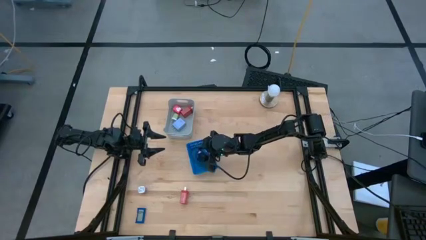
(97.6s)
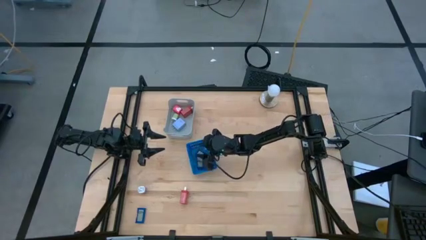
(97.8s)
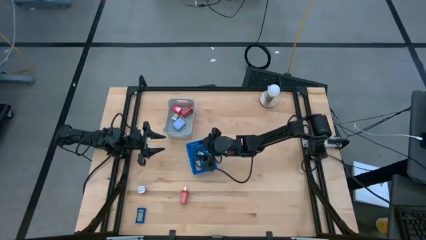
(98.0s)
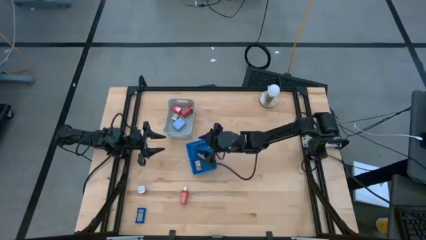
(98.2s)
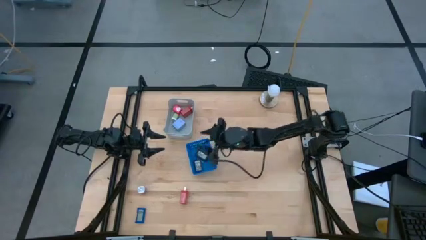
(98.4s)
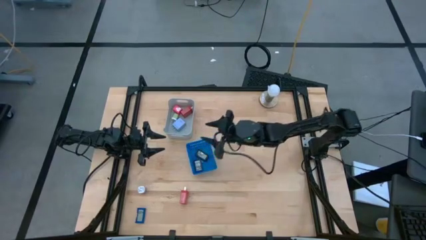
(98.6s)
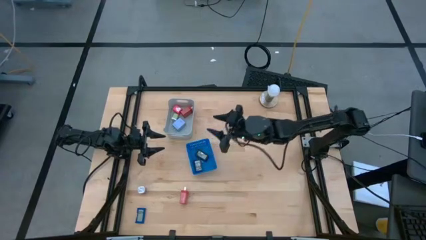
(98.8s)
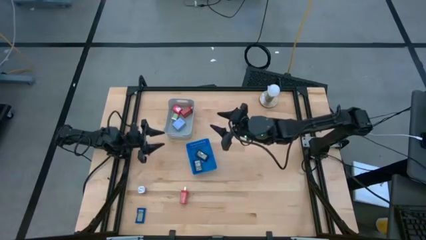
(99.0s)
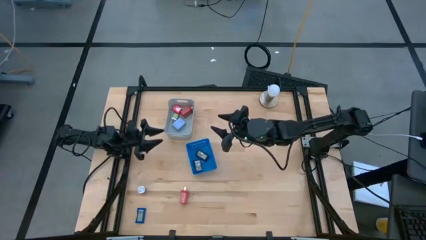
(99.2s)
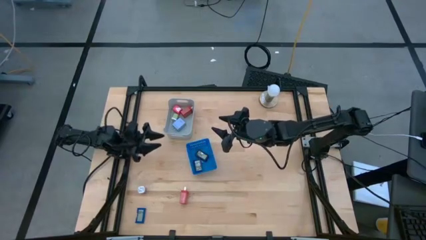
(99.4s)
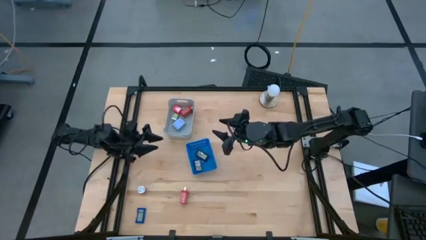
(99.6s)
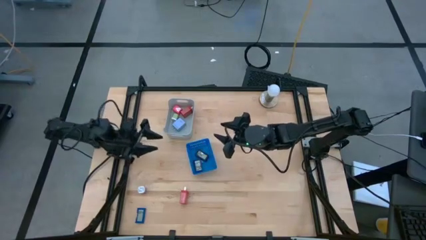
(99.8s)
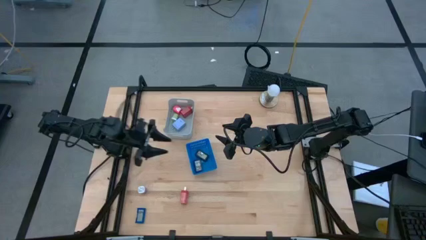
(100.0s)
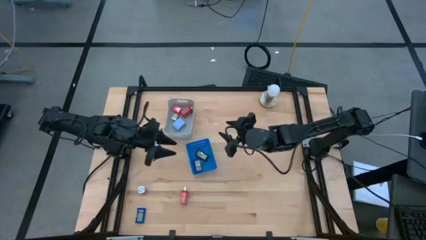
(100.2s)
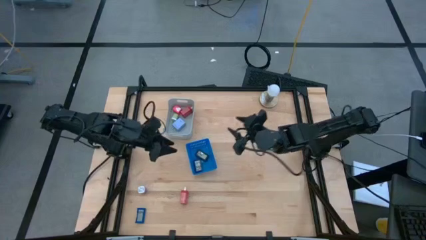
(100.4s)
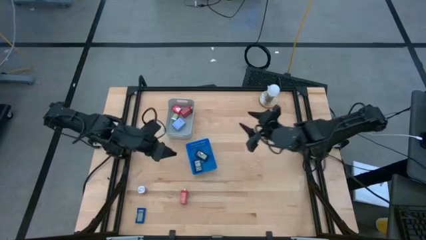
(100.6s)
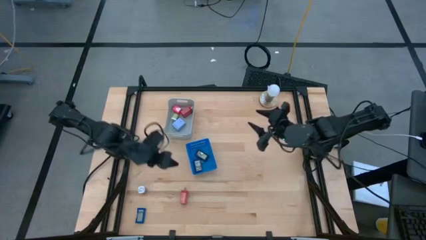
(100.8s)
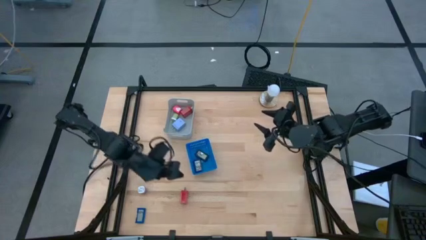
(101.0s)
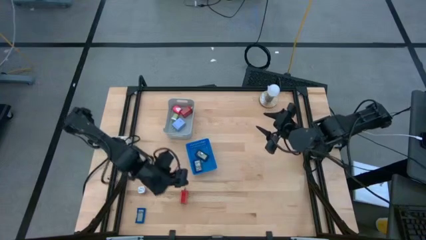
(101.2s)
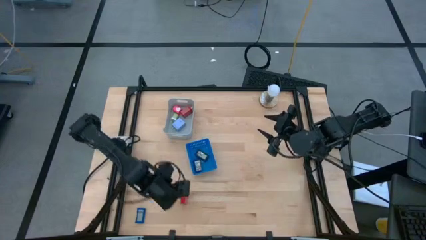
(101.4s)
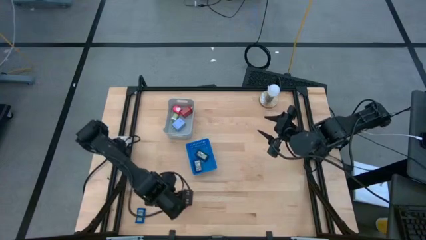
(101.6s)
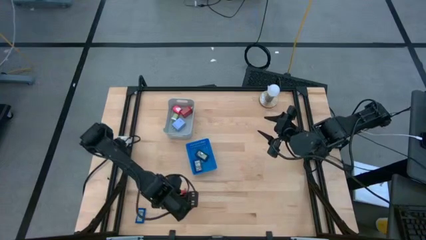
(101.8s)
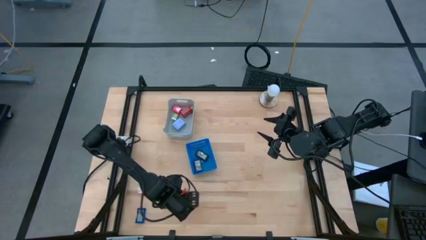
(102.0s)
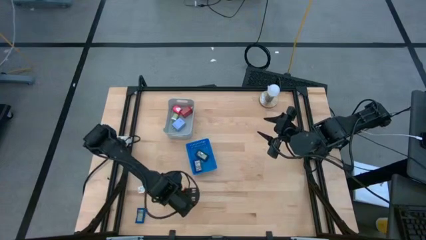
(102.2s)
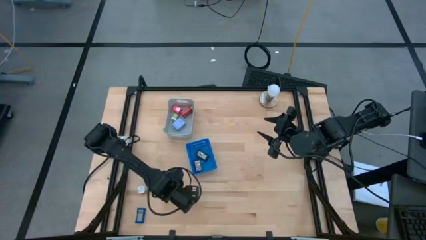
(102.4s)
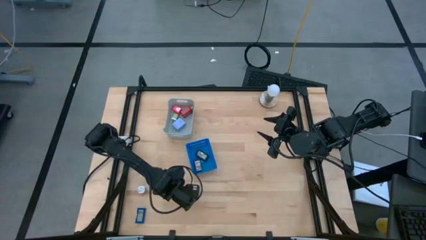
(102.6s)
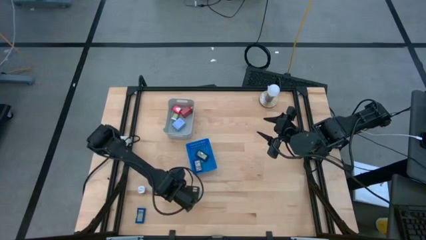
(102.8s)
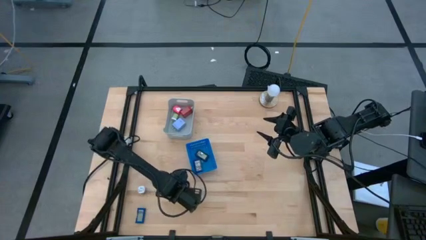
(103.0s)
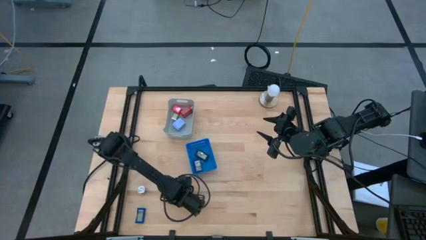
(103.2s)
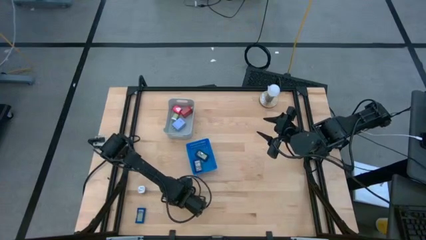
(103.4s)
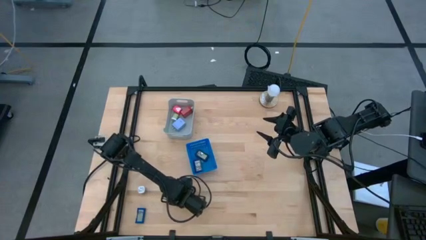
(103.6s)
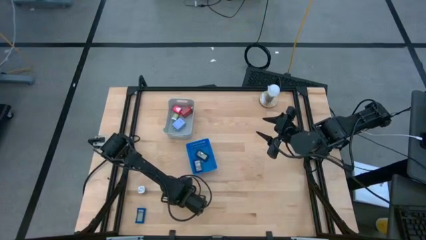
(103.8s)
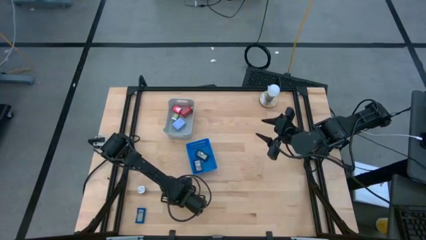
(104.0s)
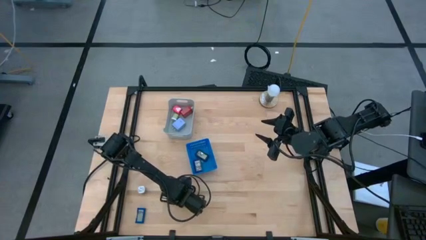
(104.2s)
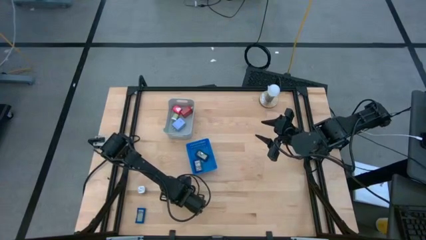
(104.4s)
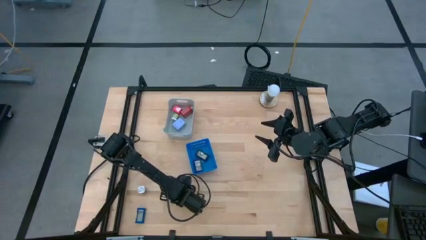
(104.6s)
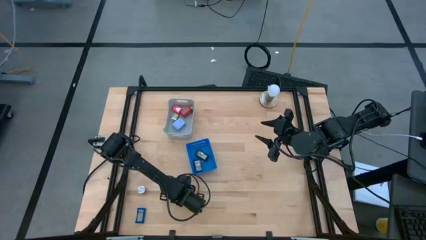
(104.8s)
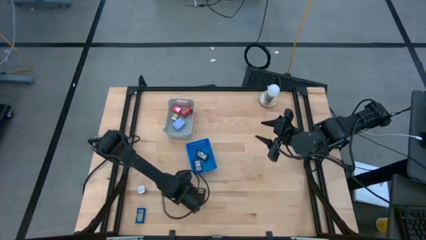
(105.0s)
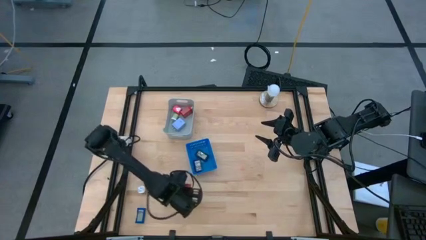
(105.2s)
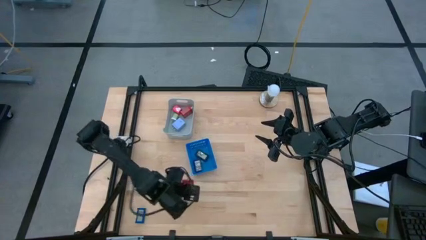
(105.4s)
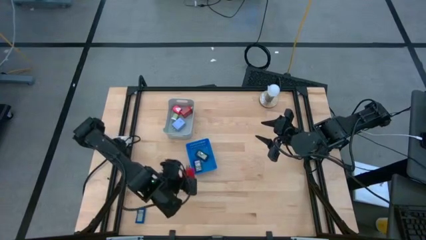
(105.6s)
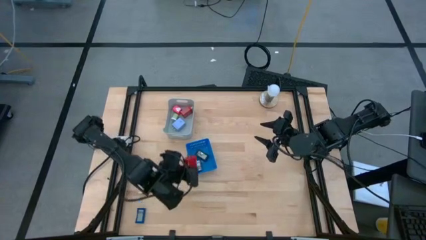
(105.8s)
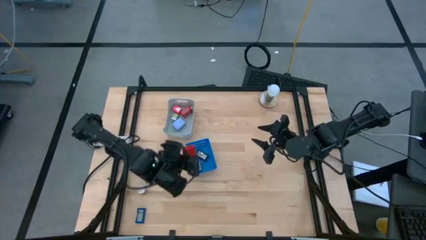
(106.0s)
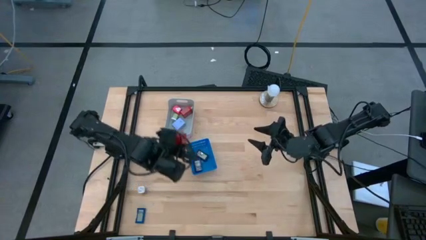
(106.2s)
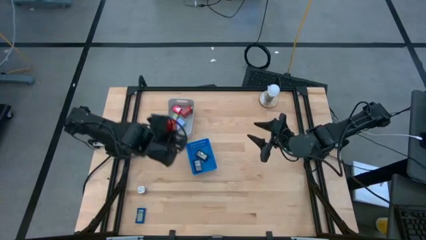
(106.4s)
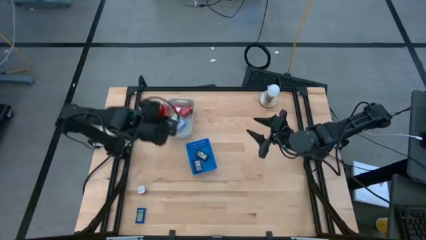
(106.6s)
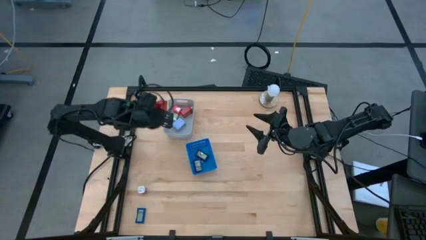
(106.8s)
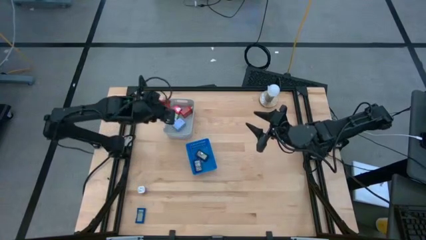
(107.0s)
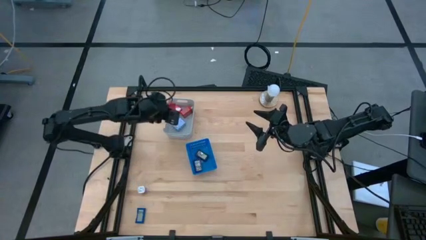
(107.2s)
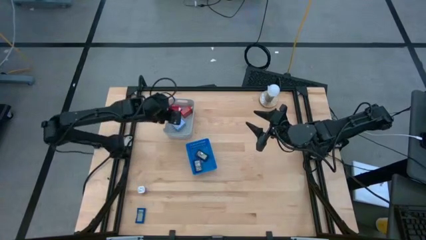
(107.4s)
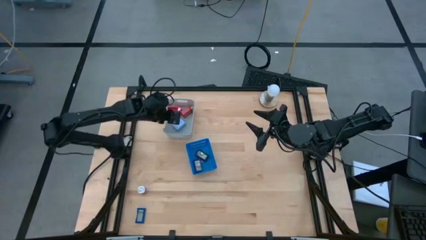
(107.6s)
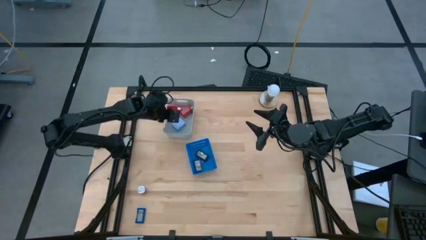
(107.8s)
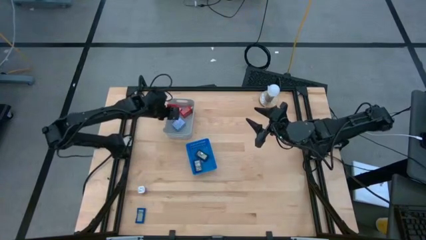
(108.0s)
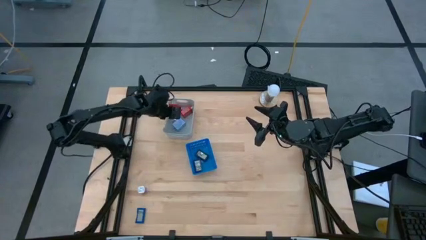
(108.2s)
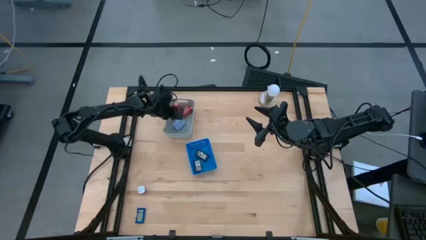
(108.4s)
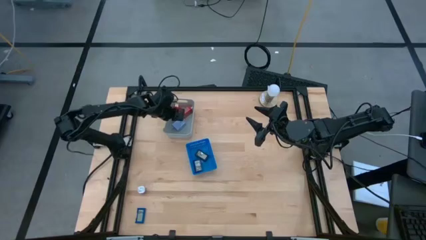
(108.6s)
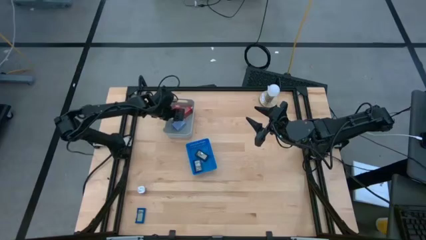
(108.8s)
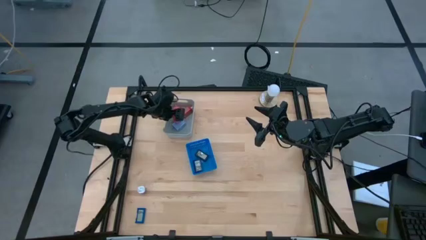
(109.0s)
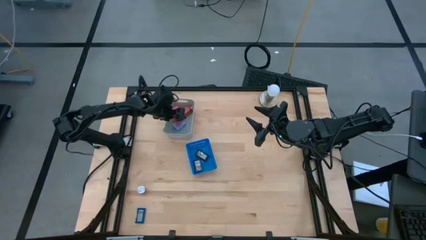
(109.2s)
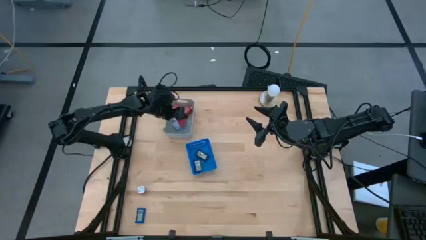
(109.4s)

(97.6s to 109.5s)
Task: Pick & Place Office items
Put the red charger adapter into the gray bin

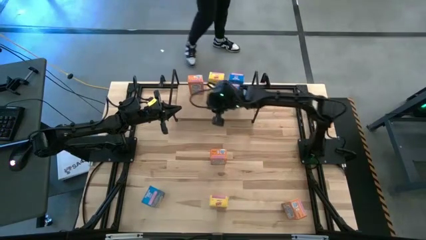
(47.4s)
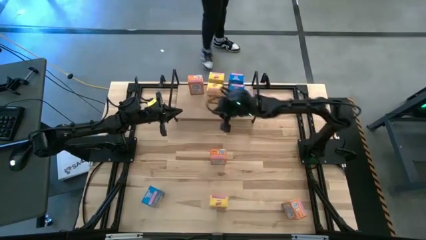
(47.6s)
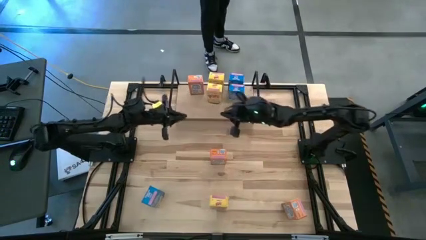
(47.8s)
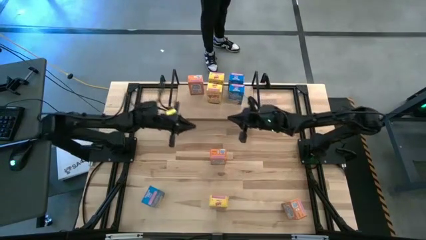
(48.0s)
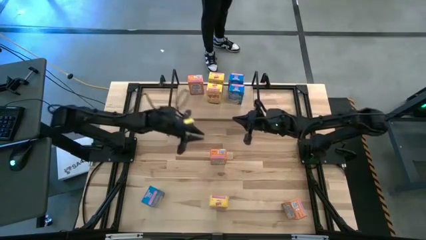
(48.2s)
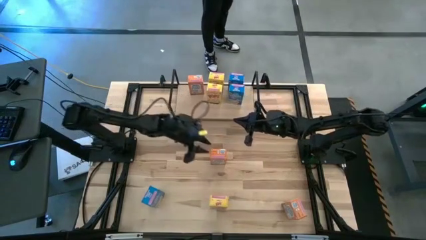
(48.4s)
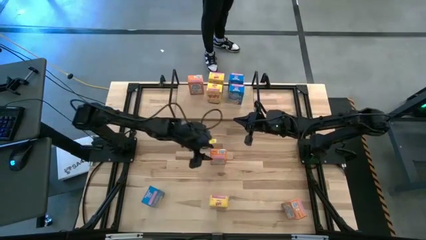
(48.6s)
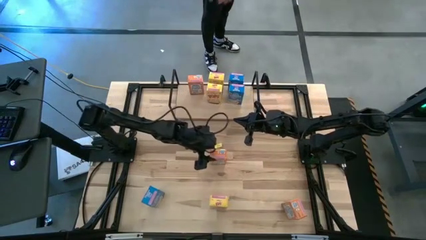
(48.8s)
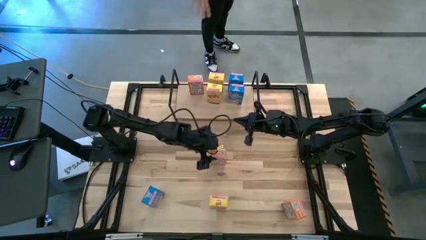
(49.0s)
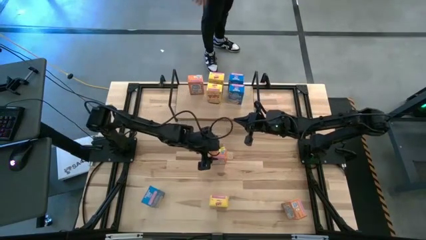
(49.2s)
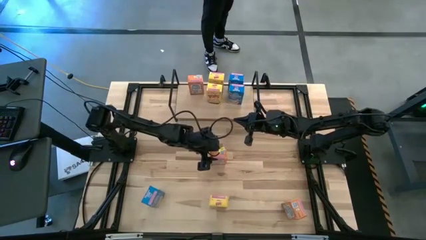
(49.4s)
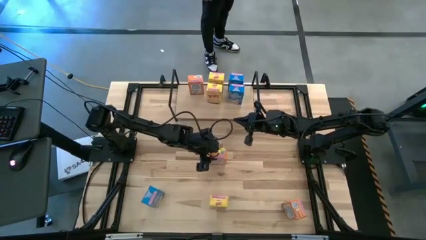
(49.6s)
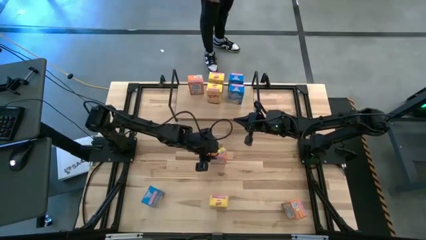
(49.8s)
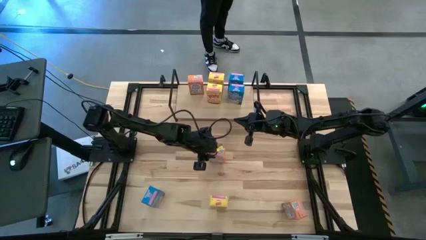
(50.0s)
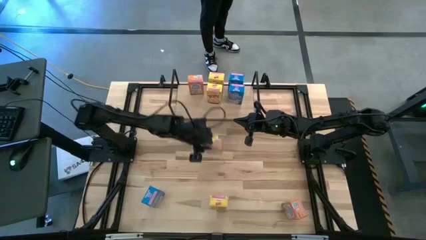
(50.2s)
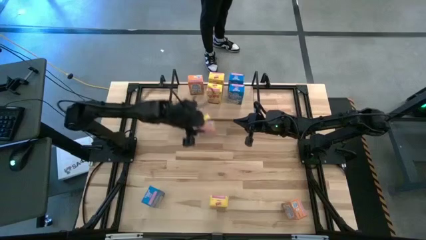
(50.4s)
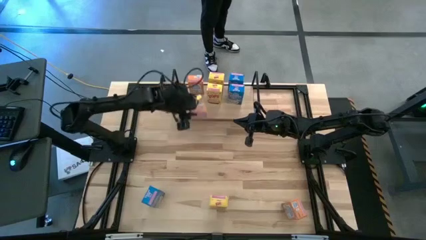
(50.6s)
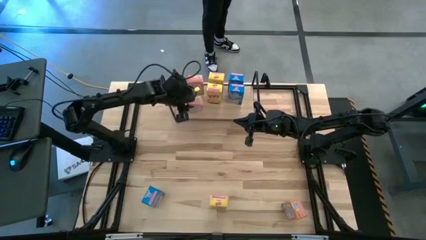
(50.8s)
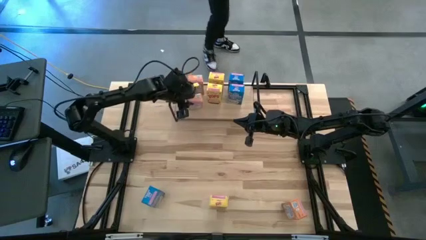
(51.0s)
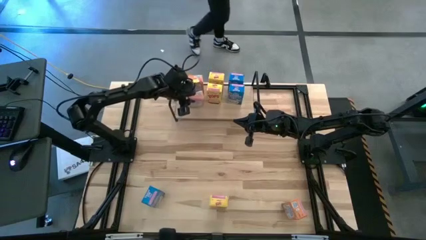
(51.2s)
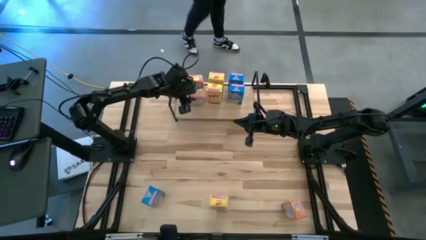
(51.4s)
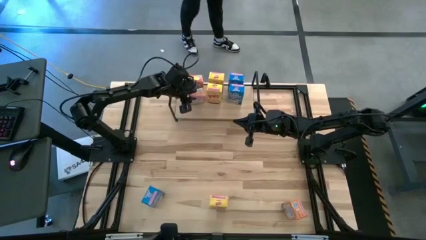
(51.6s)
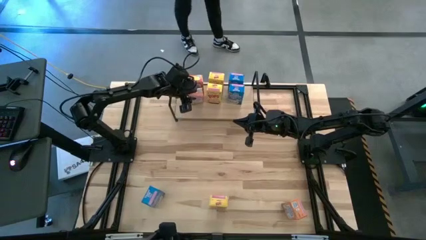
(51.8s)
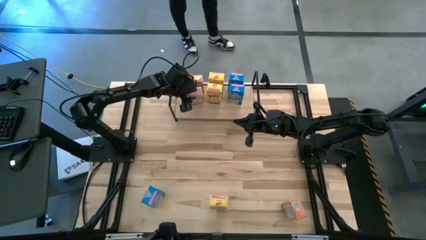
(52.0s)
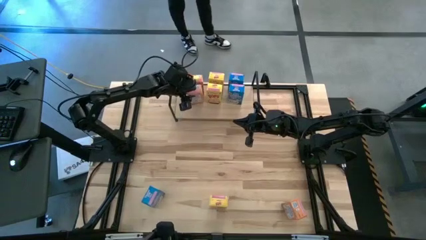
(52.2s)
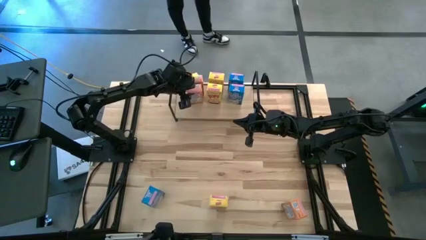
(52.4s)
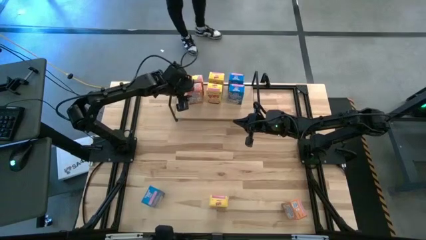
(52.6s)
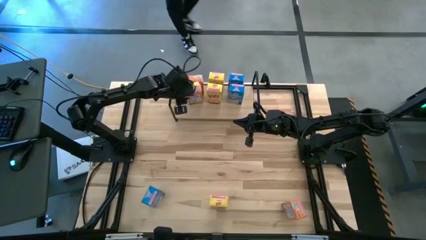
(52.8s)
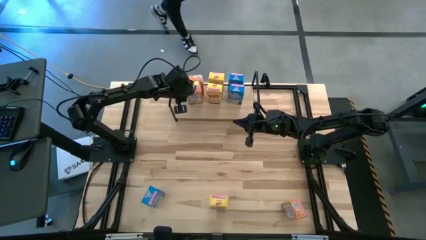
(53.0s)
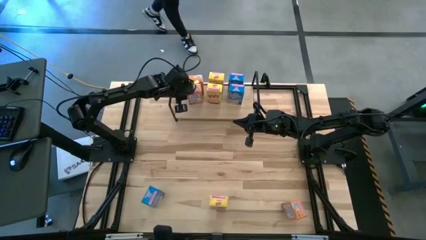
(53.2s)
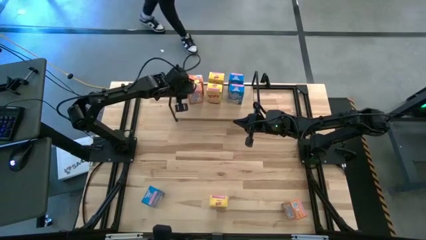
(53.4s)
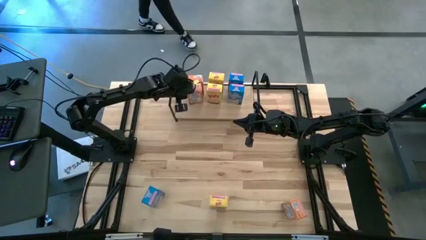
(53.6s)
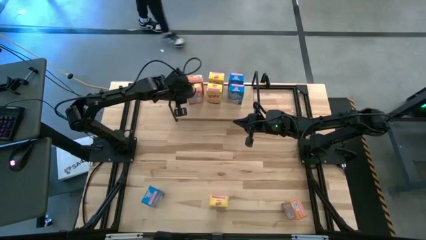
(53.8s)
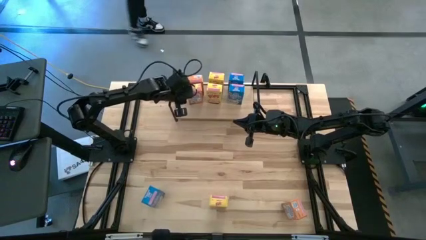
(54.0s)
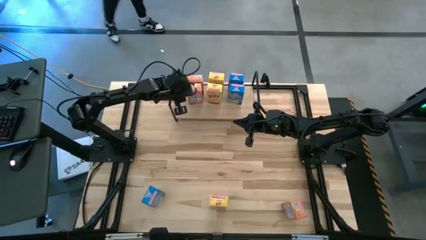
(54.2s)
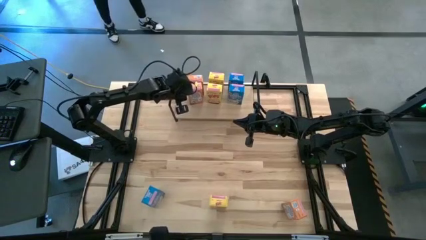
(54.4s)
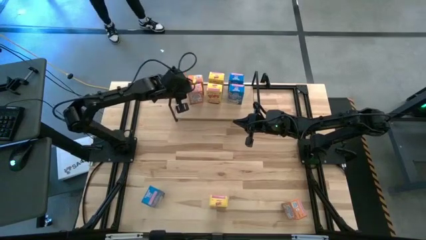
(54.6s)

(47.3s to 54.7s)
Task: Stack cereal on shelf
Put the top orange cereal box on the shelf aligned with the other orange cereal box
